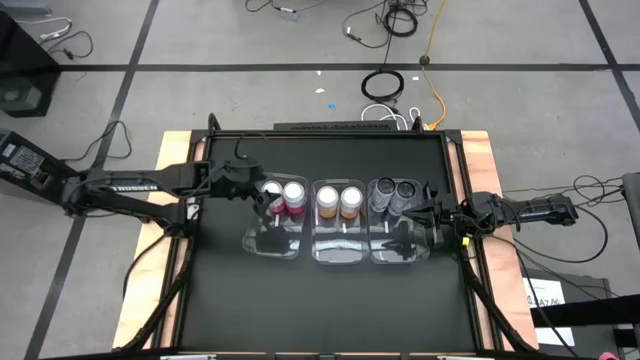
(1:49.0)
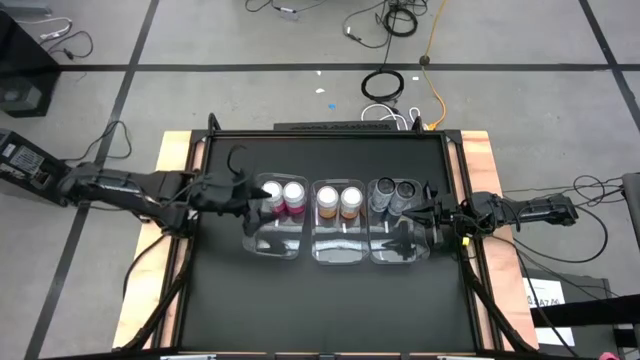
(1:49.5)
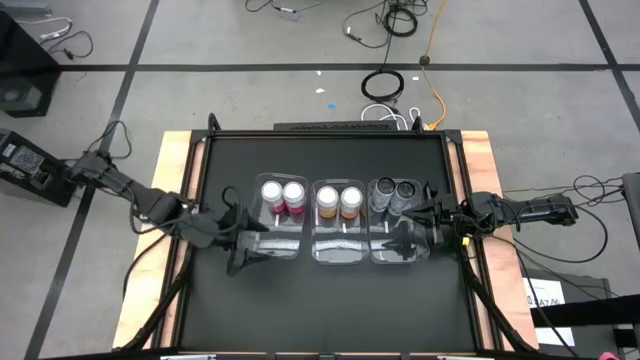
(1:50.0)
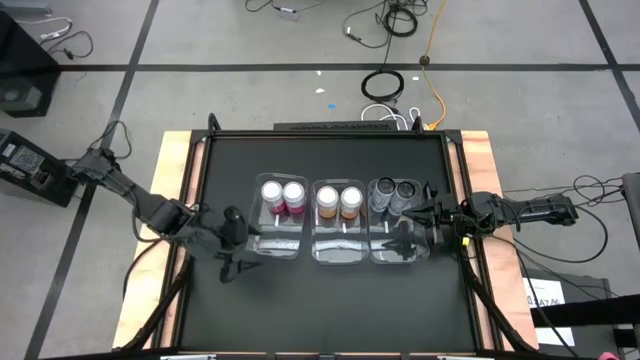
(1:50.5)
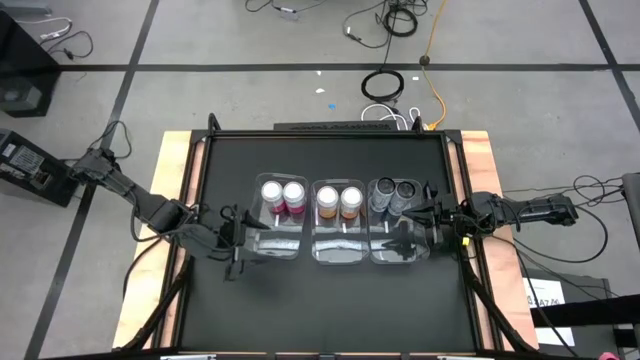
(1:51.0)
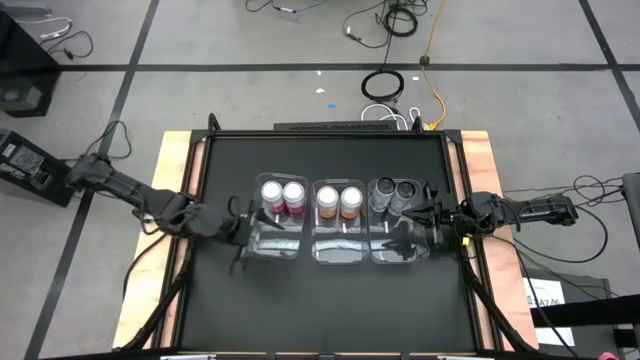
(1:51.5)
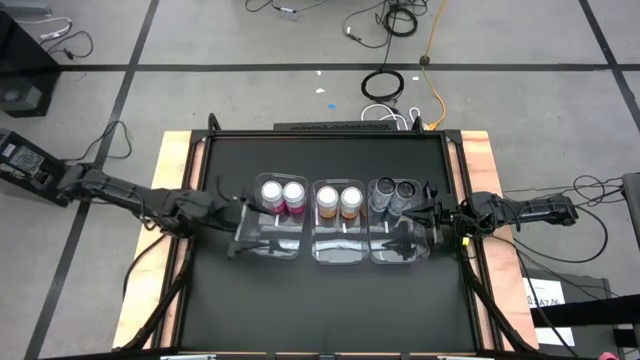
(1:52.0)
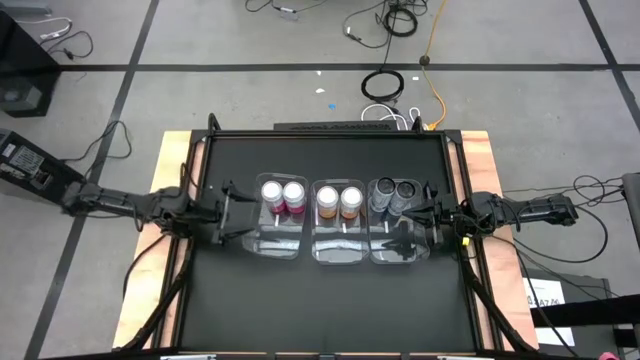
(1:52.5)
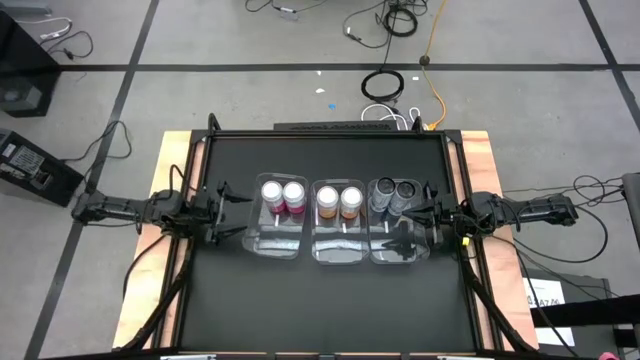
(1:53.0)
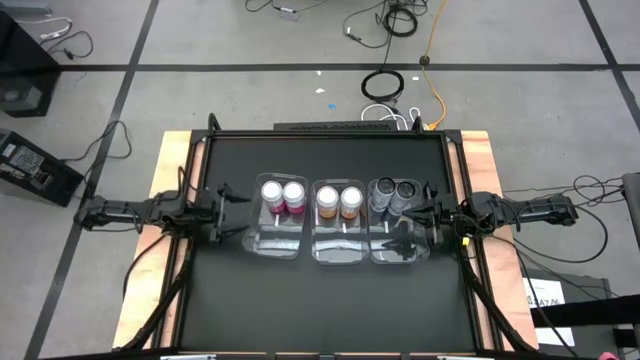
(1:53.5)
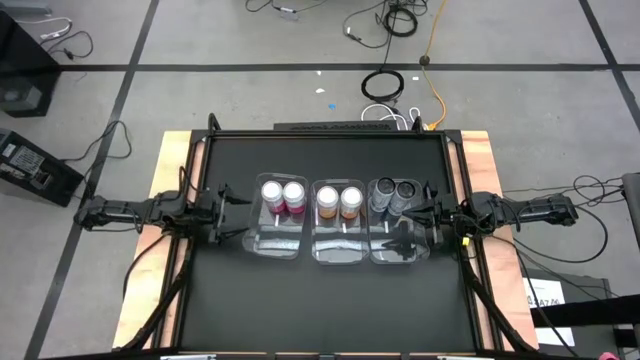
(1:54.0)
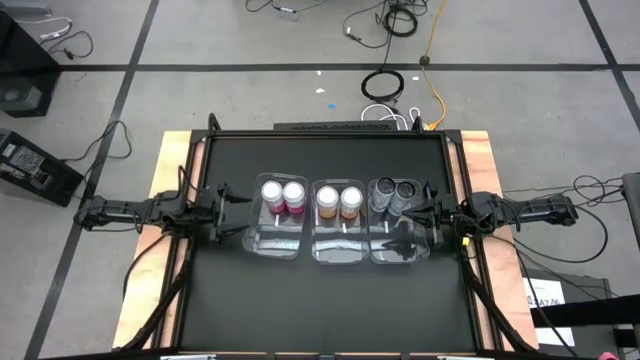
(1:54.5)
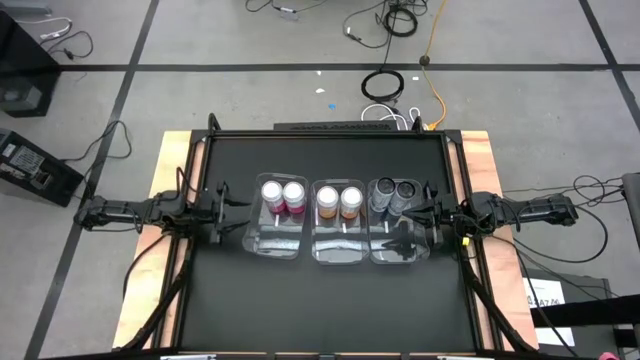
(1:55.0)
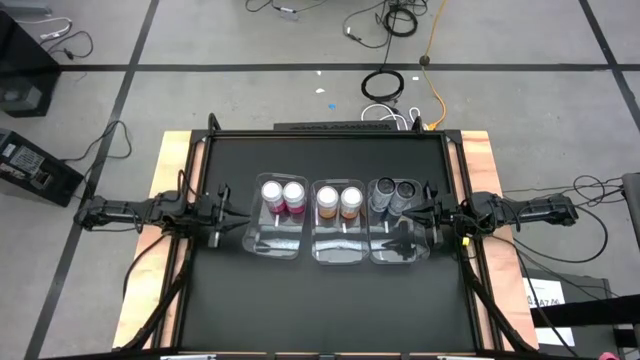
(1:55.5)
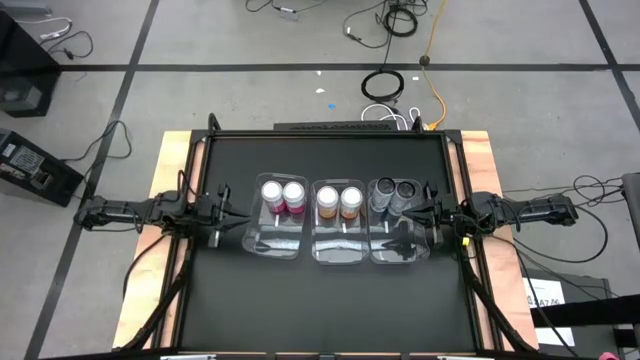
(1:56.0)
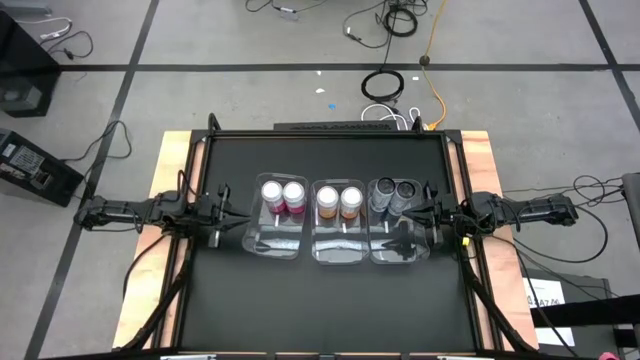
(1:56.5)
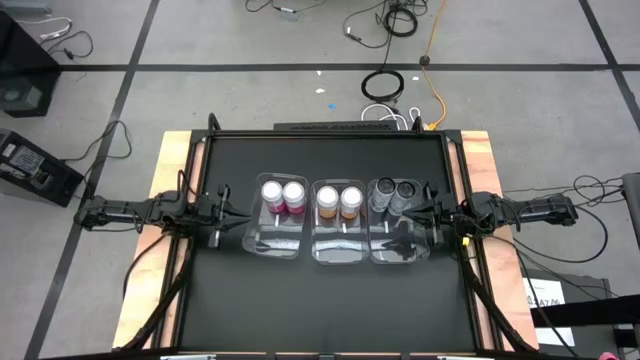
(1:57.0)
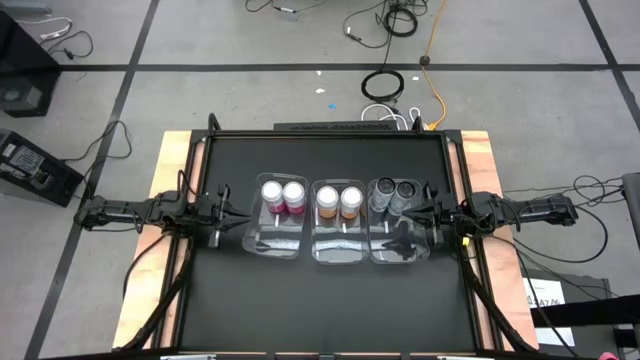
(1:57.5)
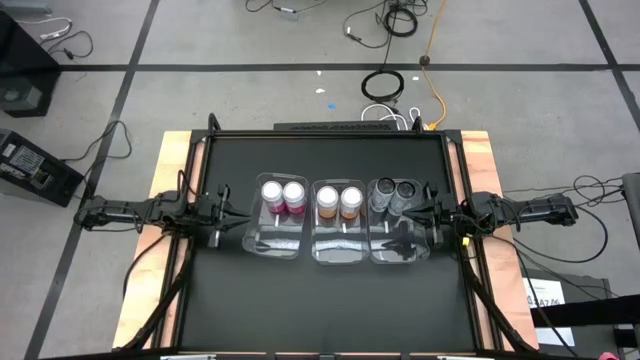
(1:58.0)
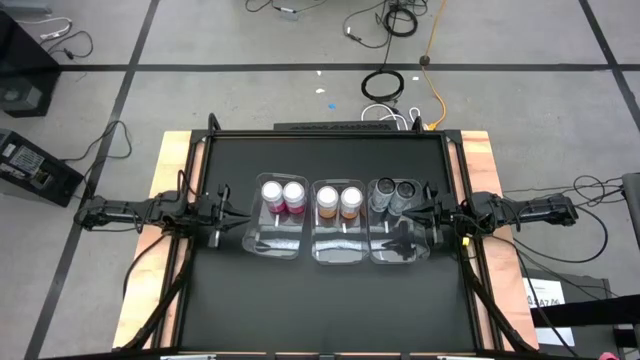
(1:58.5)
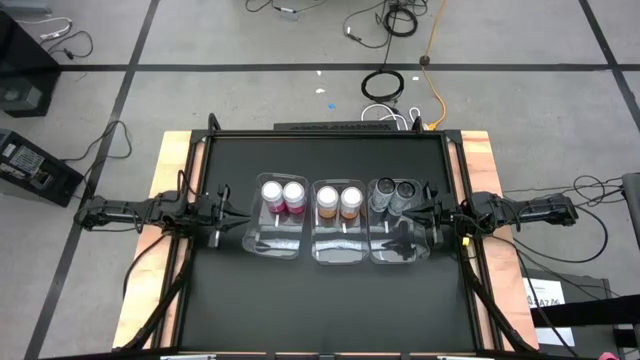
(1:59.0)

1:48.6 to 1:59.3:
Task: Sort soda cans
Return to Home Position

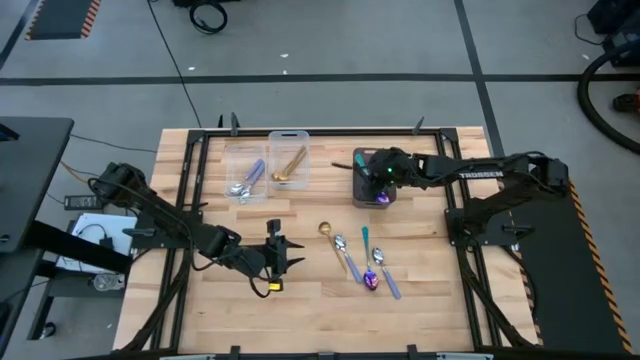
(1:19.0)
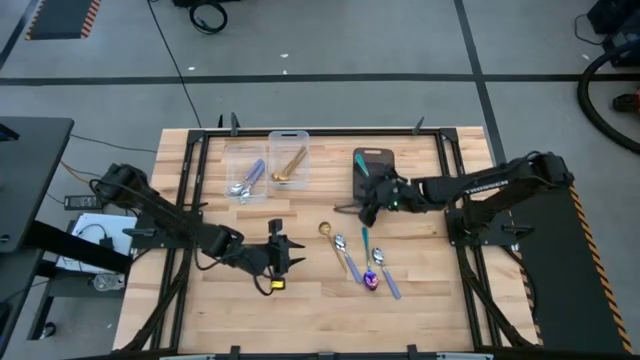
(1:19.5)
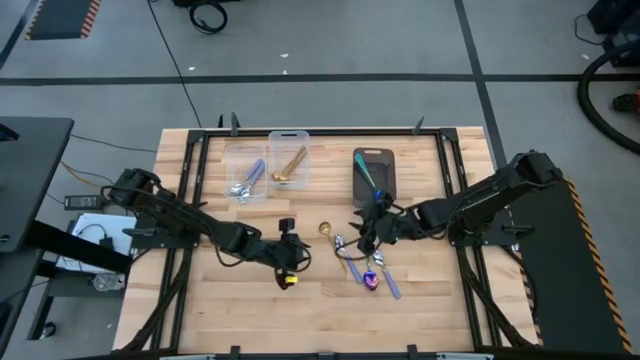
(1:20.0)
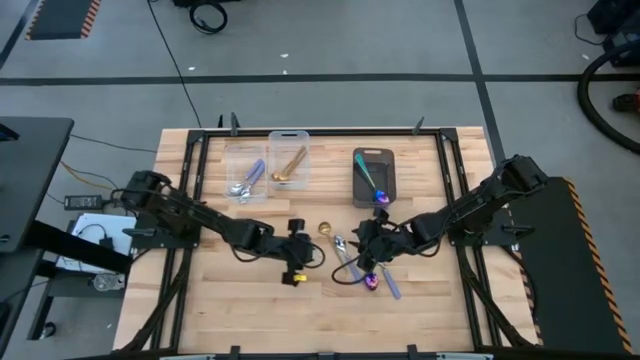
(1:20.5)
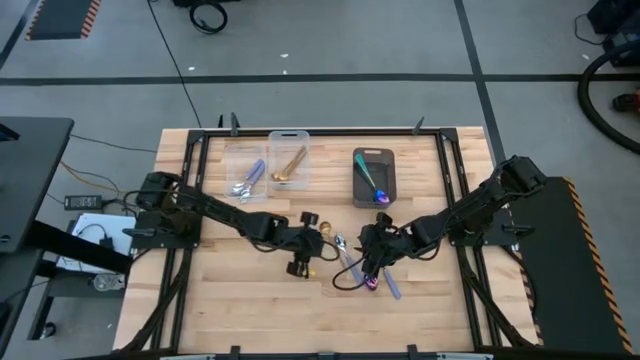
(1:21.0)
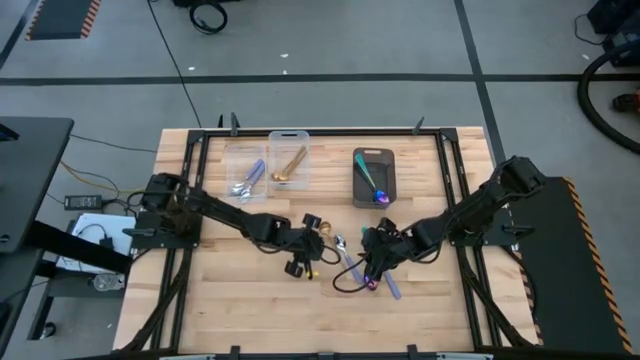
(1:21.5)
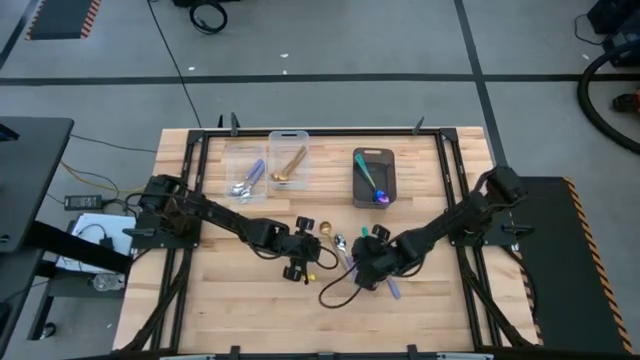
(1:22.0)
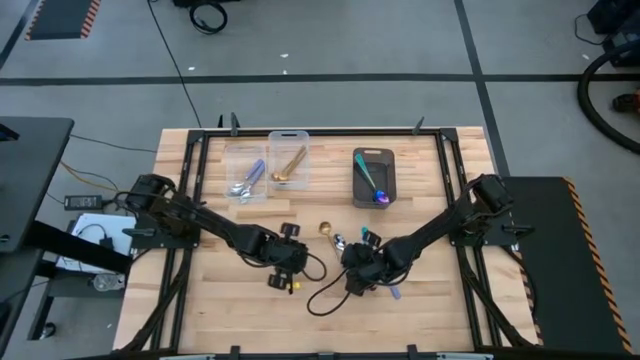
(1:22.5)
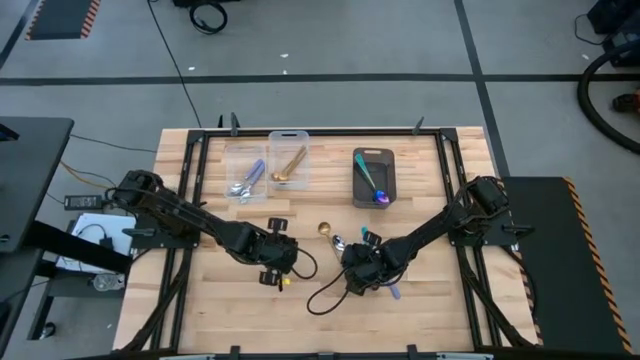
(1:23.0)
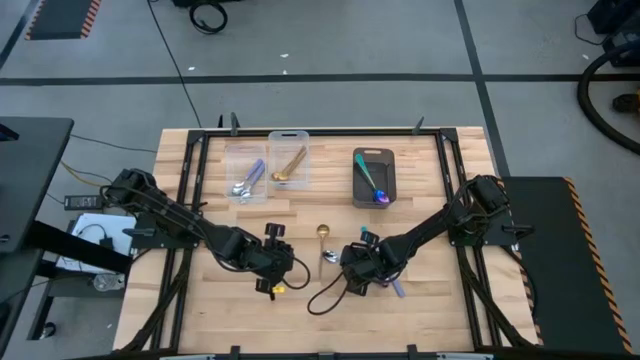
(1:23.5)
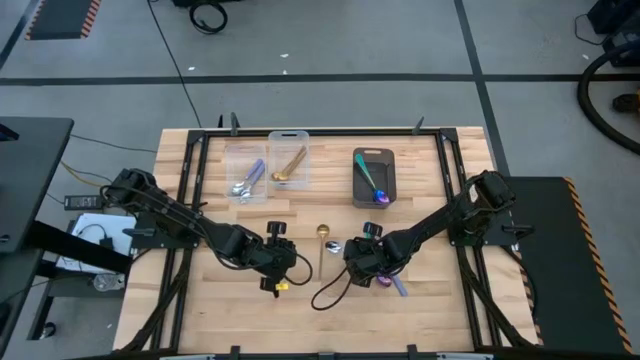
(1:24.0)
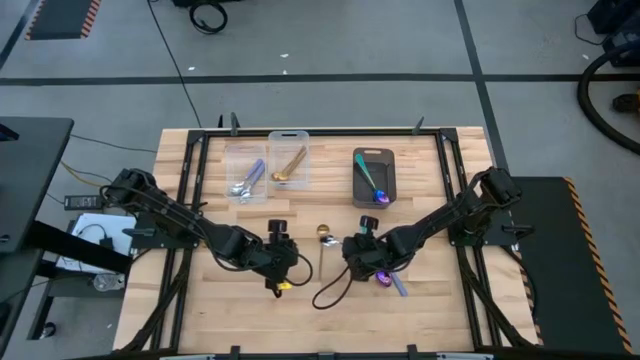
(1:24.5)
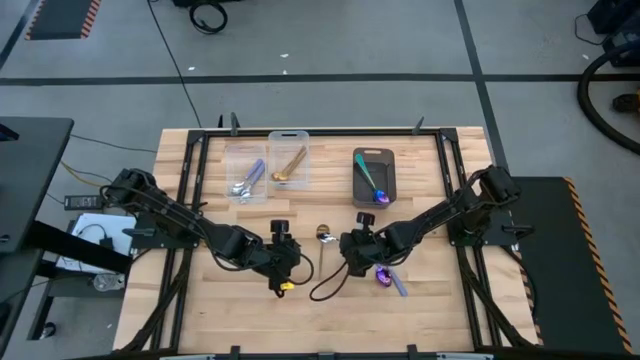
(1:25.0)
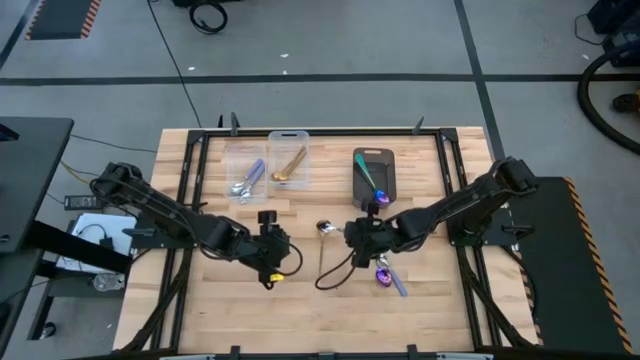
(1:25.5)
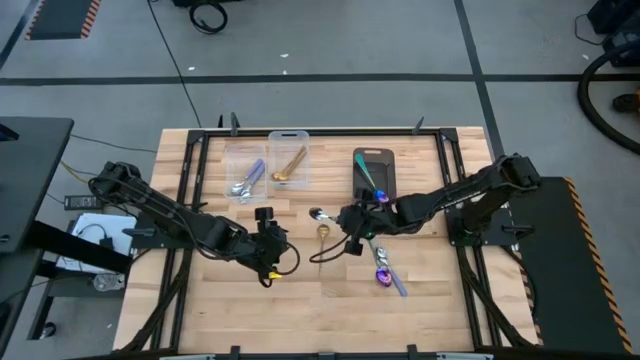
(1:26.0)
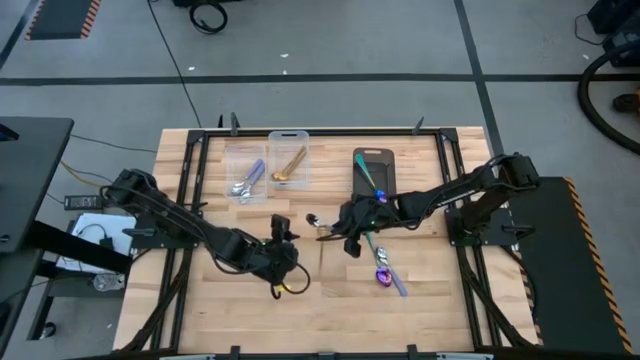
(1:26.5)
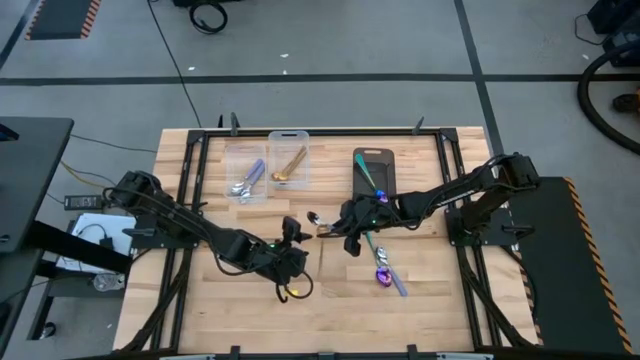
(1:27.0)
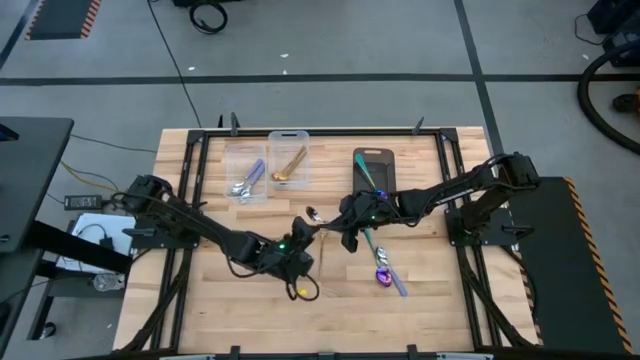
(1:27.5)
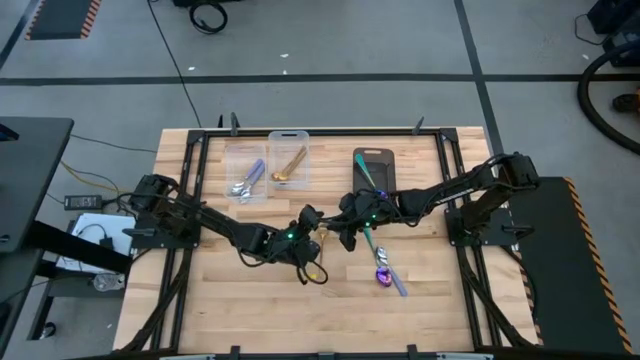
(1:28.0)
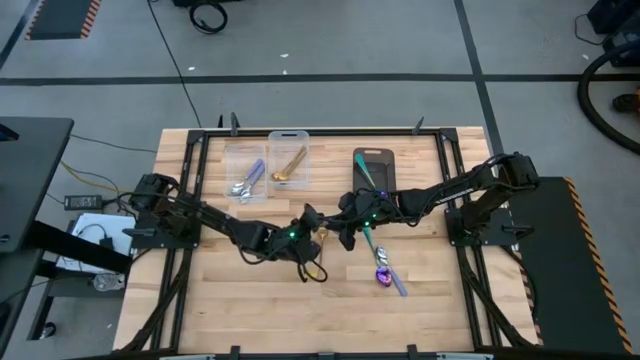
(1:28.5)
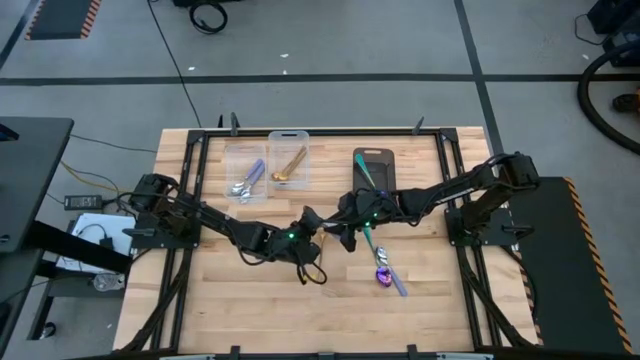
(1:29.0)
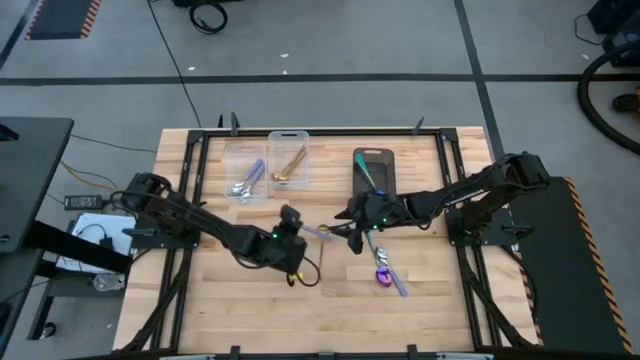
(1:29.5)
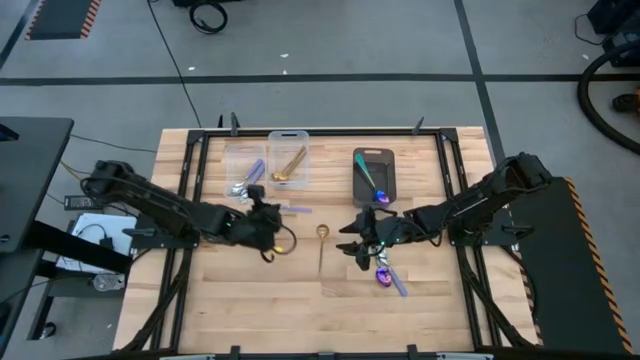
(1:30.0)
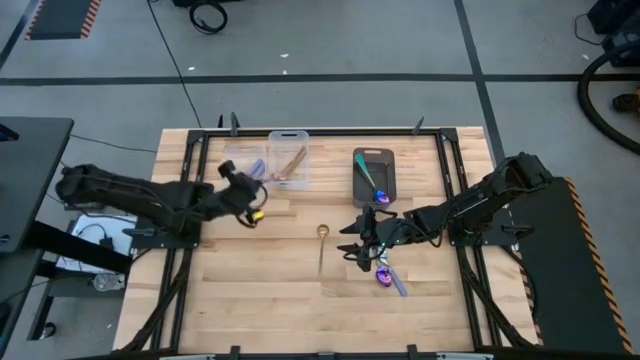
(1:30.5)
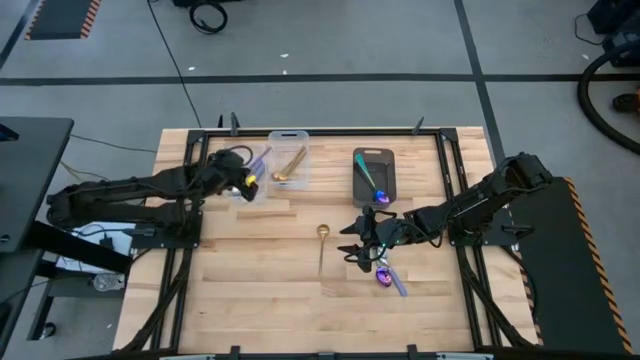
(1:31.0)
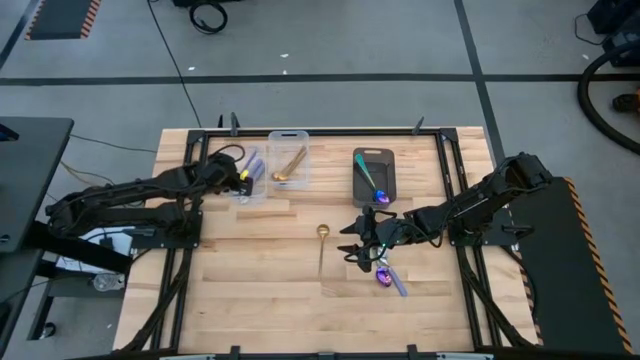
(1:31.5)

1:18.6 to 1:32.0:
Task: Sort silverware by color (type)
Put the purple spoon into the left transparent bin
